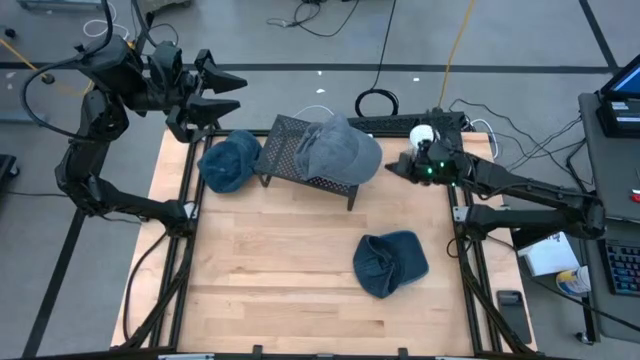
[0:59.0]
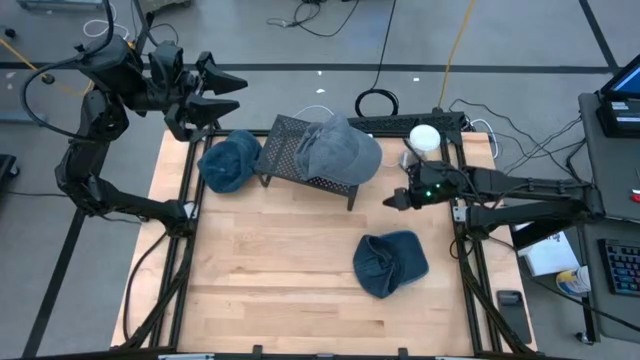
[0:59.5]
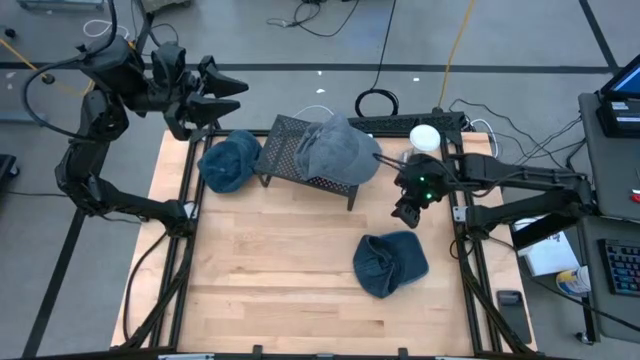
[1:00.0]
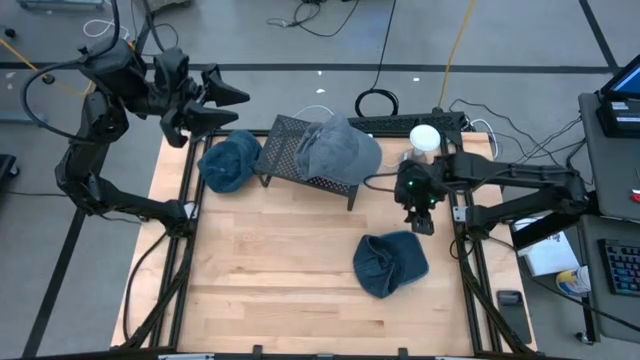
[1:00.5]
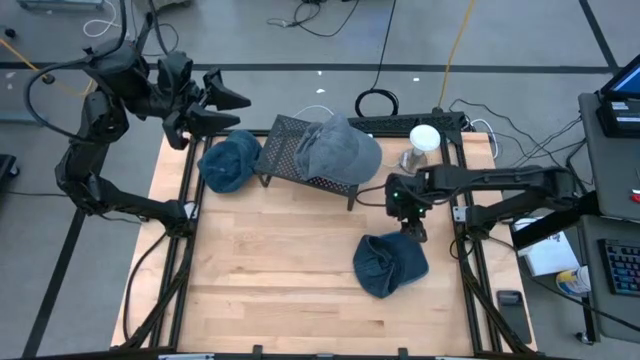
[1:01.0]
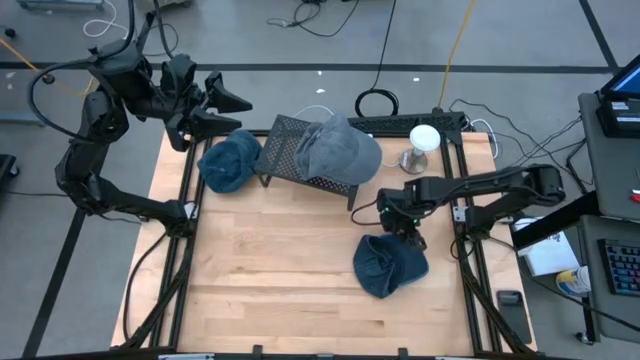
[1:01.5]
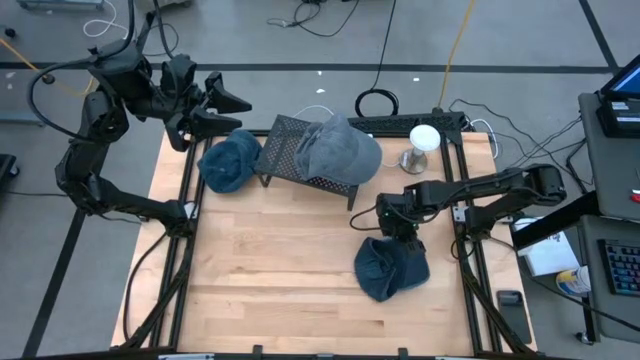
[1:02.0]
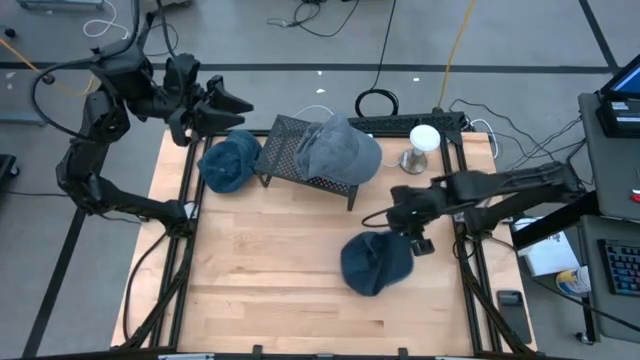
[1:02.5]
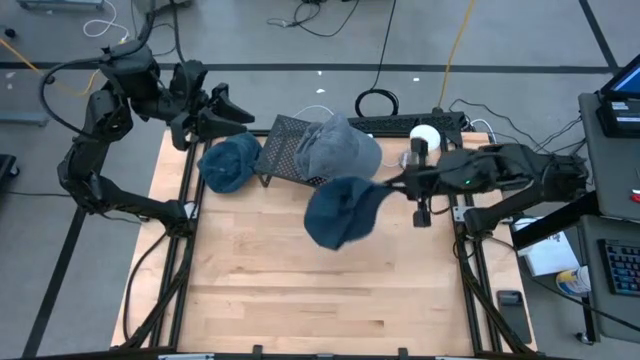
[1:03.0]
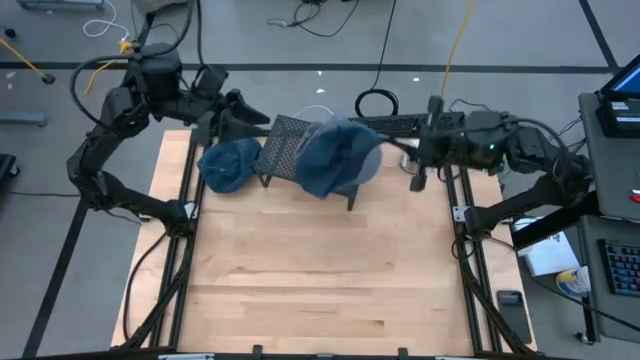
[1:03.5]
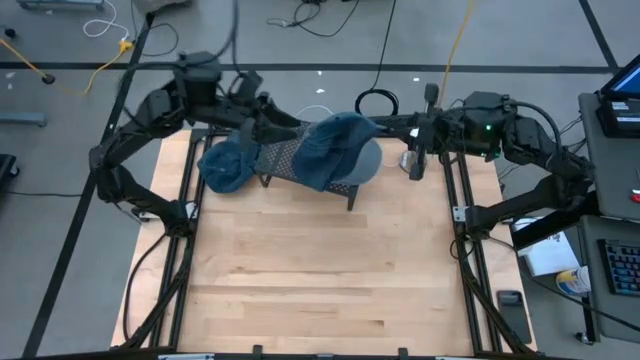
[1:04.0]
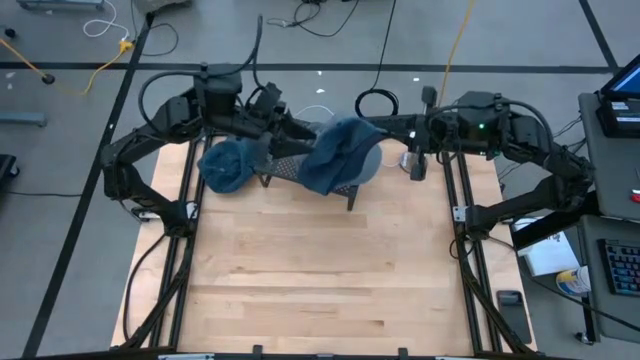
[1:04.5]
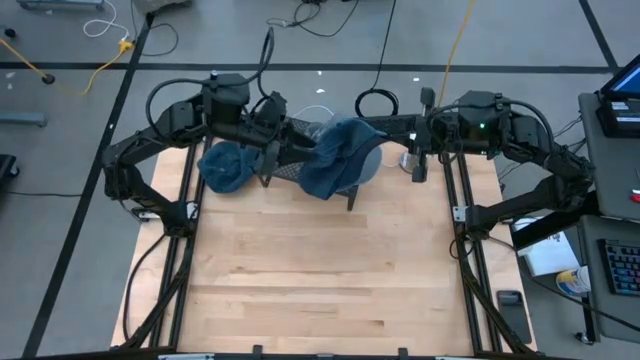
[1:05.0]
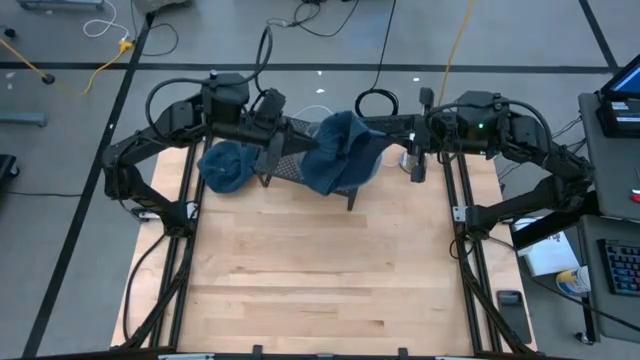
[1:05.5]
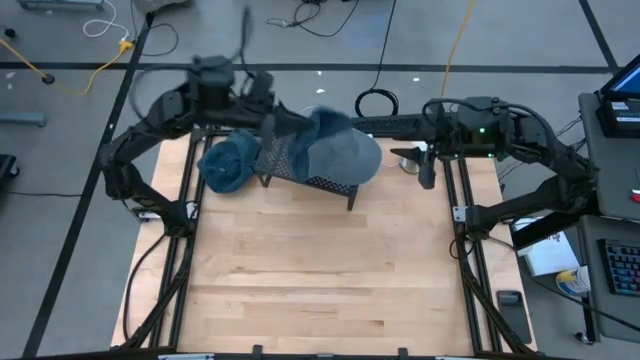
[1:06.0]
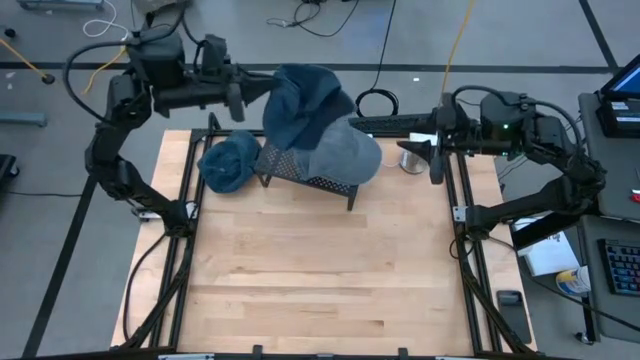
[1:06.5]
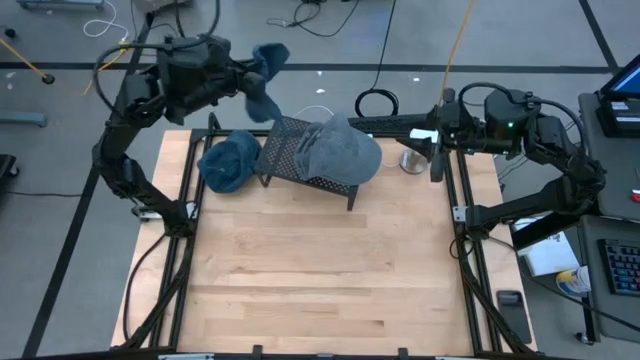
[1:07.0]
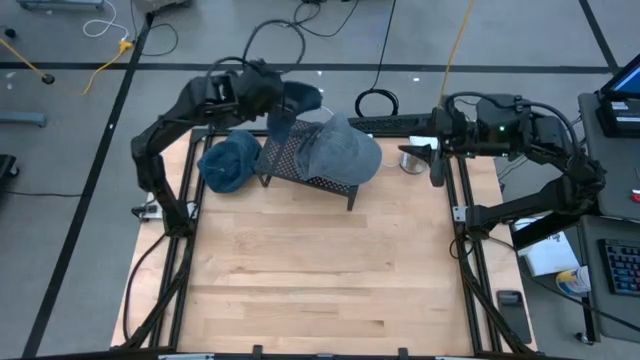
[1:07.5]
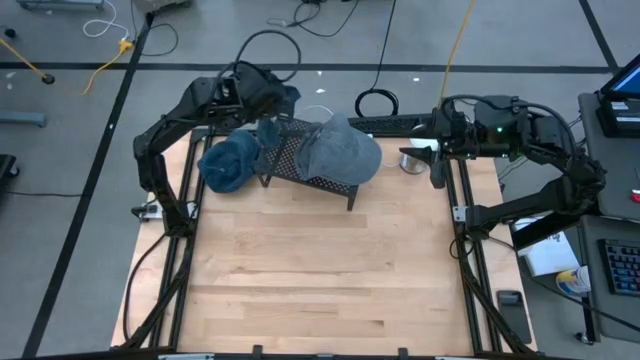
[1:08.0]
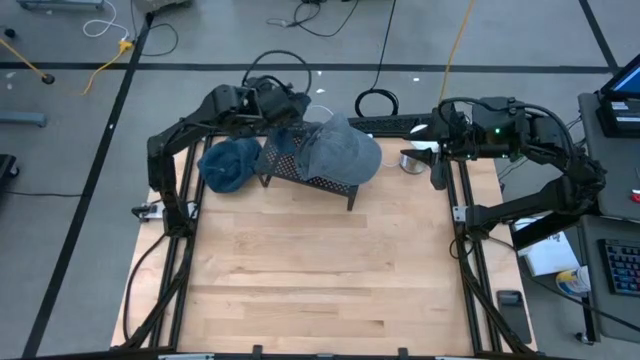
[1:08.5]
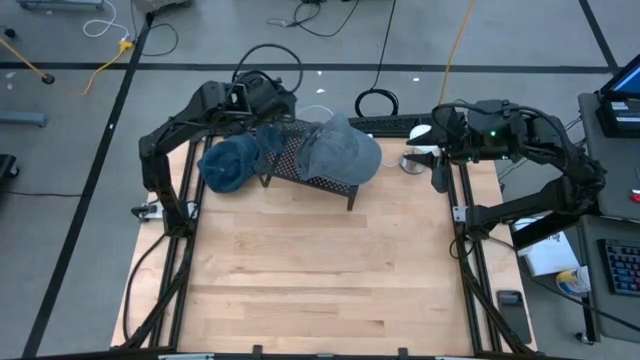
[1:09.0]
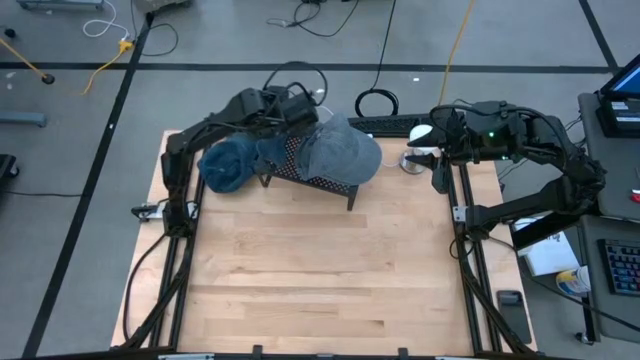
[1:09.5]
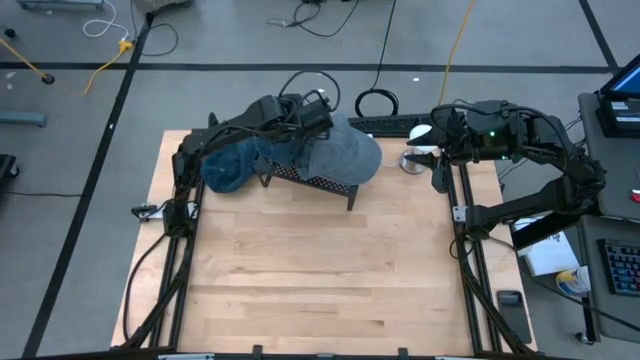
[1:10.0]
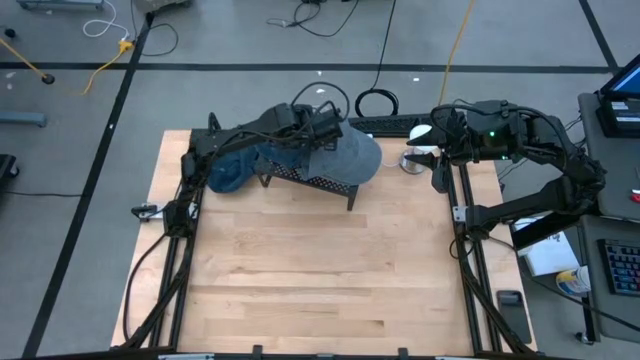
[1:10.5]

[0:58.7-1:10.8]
Task: Pick & Place hat
Put the bottom blue cap on the shelf

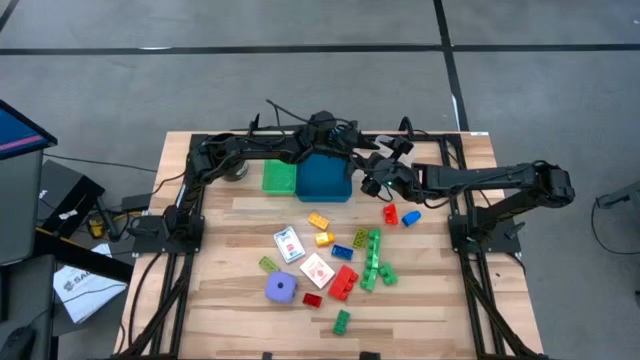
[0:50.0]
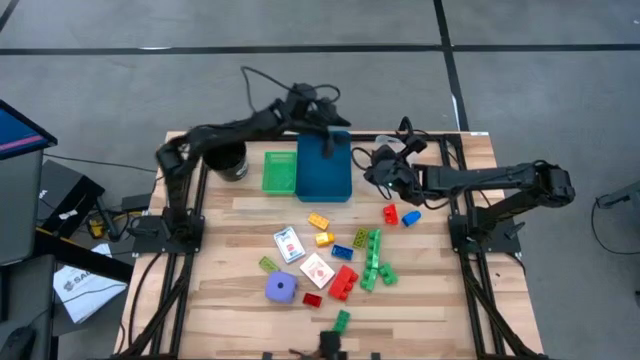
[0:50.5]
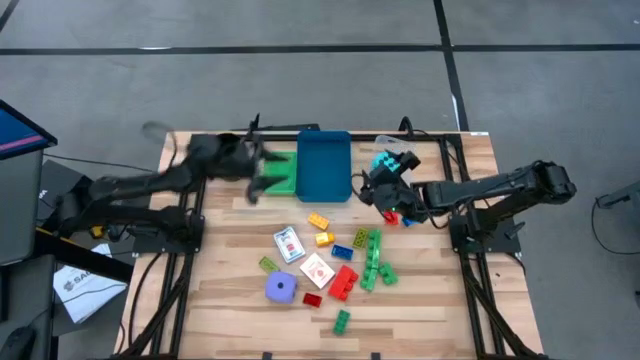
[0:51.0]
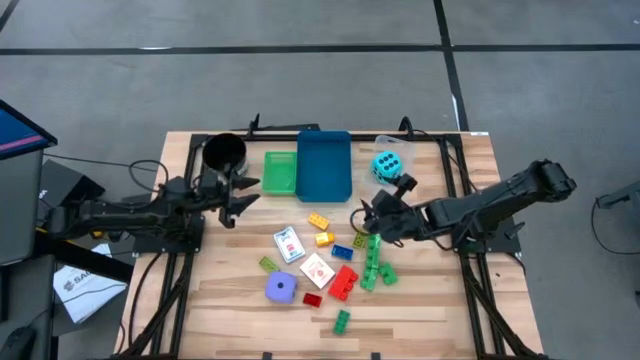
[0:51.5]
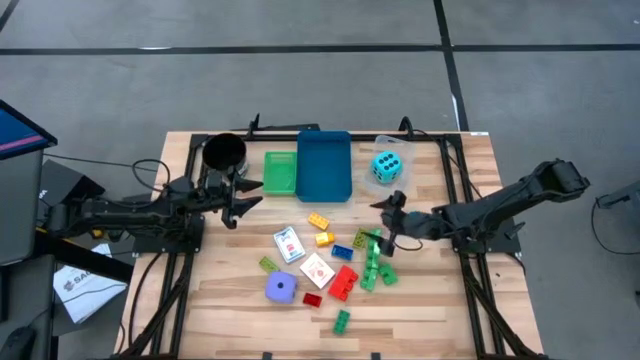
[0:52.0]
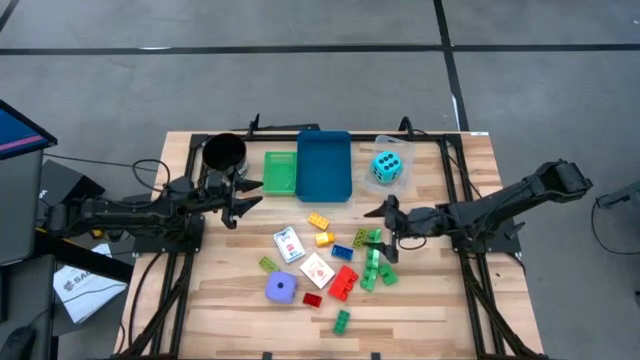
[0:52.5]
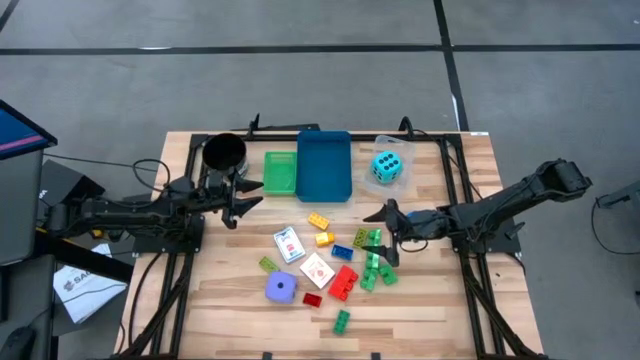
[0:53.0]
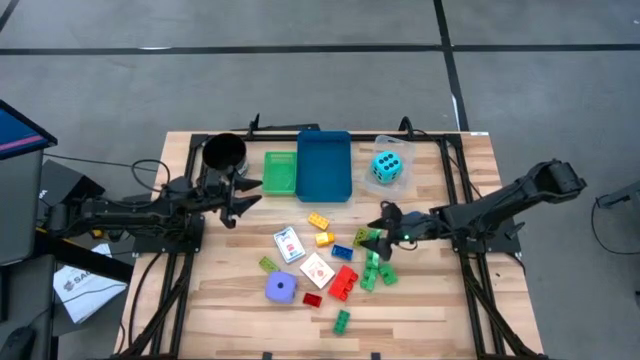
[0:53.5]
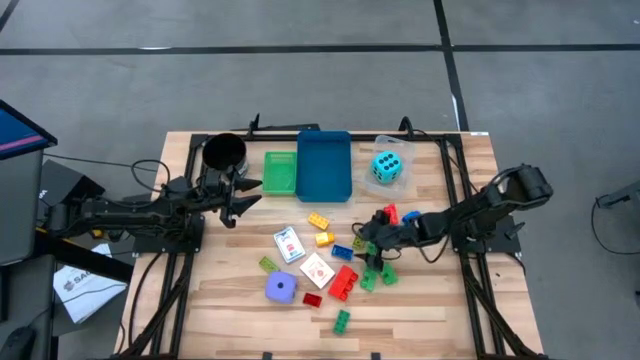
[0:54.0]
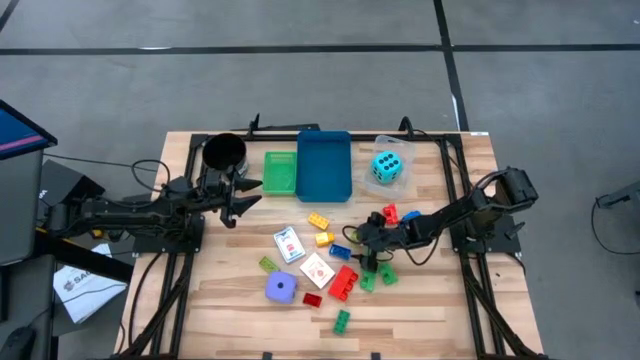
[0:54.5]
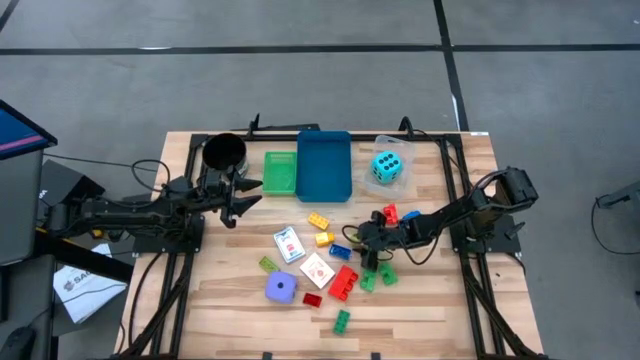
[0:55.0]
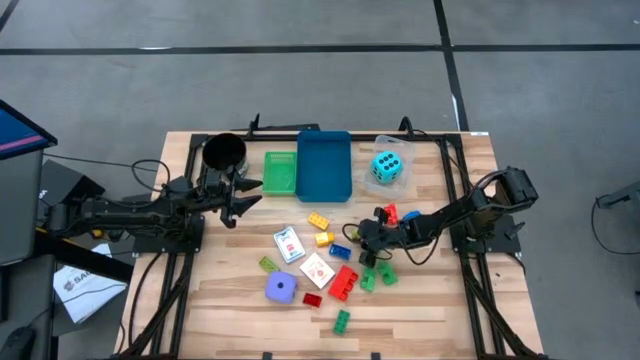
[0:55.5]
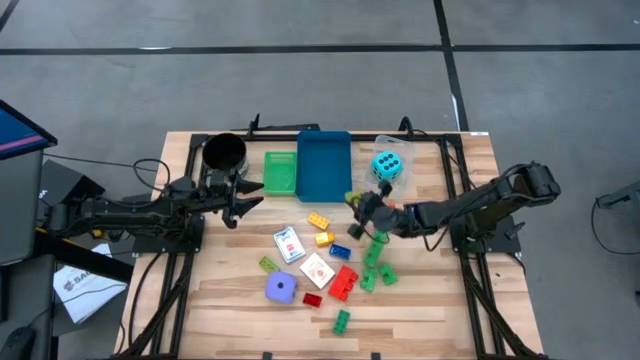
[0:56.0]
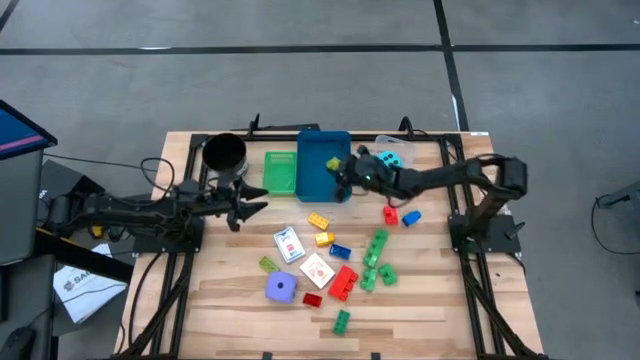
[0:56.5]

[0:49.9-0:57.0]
Task: Pick & Place Toys
Put the small stud light green game piece into the blue bin

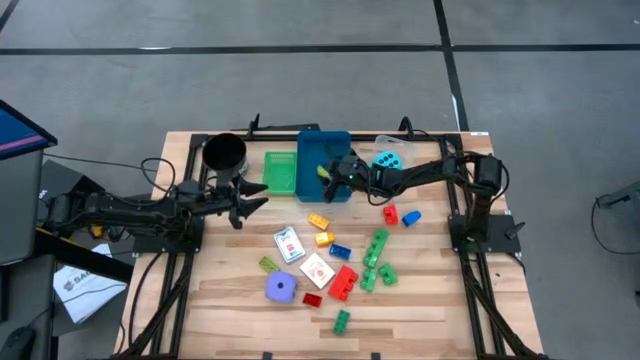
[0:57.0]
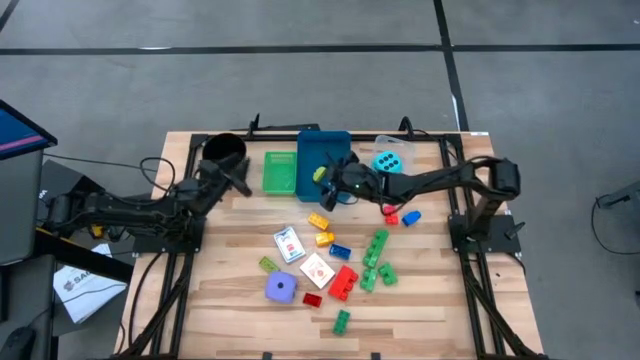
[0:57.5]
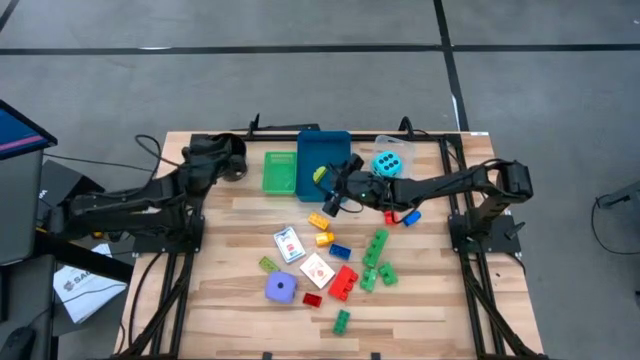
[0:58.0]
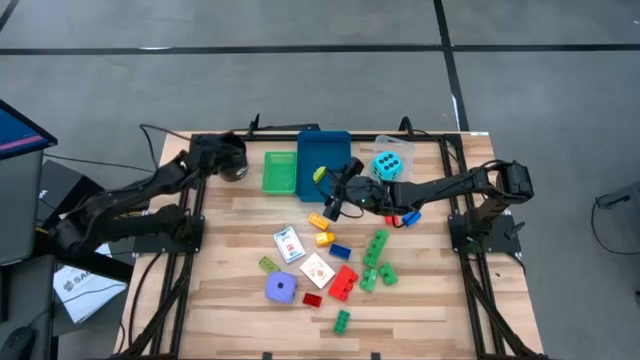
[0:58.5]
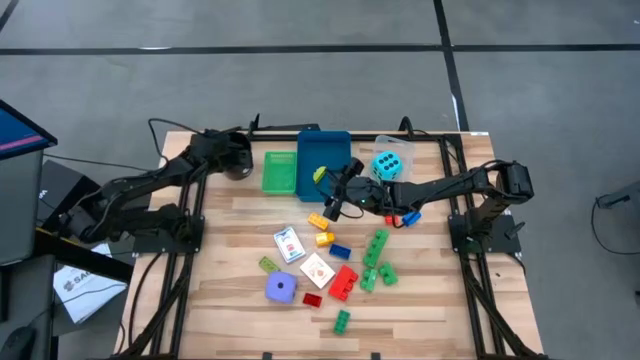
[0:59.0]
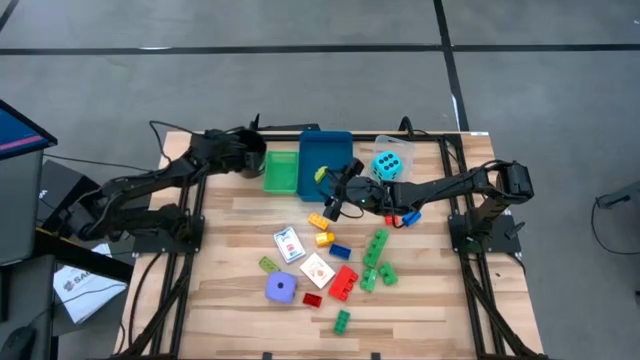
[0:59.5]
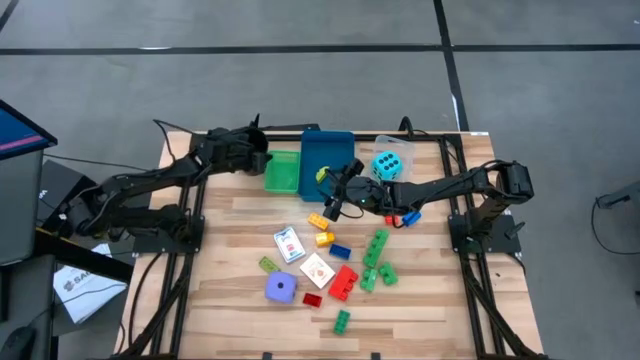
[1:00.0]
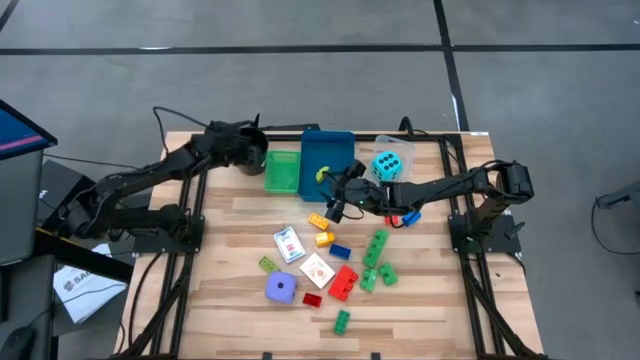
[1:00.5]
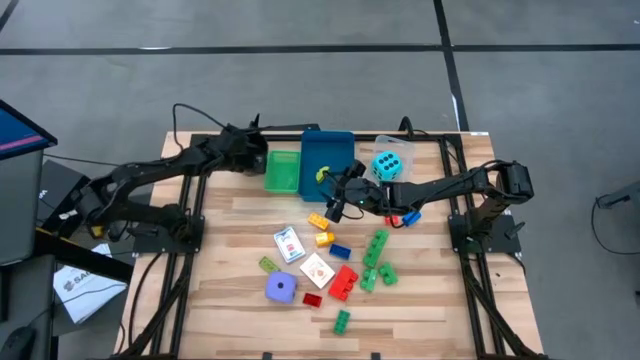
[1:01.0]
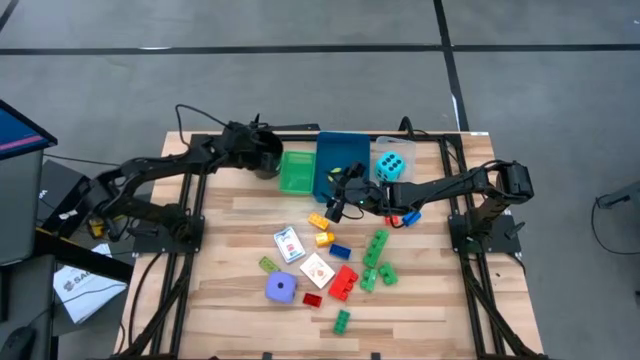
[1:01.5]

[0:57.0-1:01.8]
Adjust the orange deck of cards on the table
